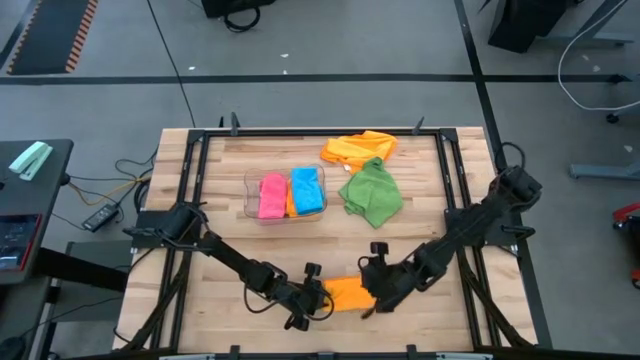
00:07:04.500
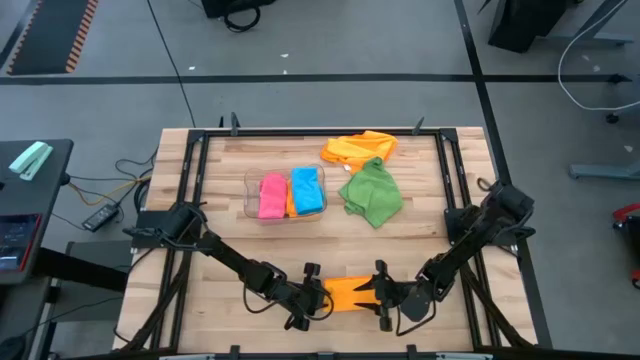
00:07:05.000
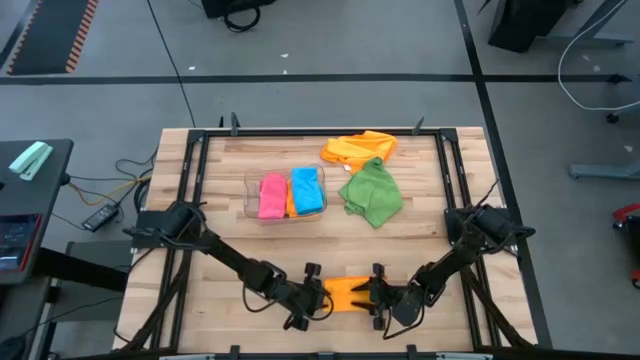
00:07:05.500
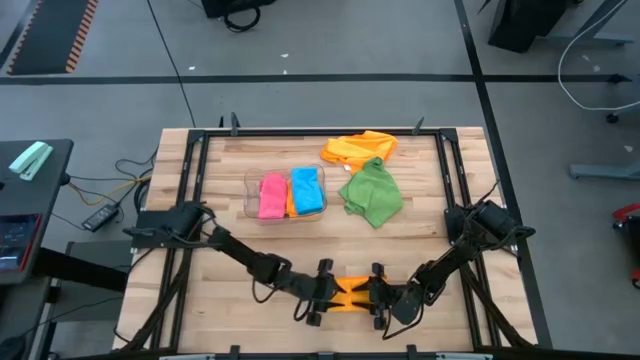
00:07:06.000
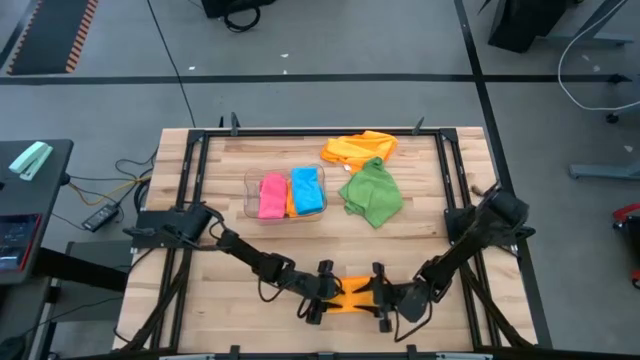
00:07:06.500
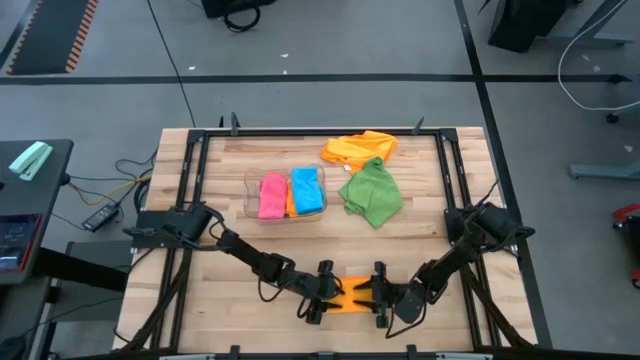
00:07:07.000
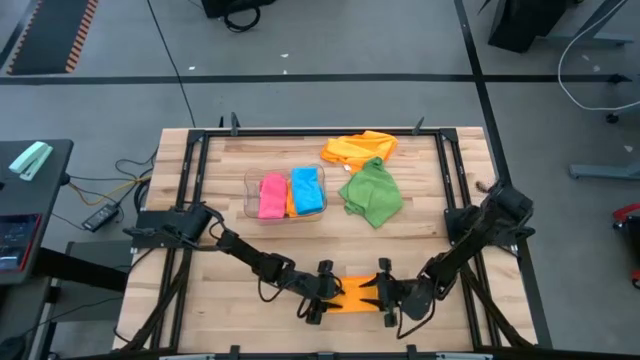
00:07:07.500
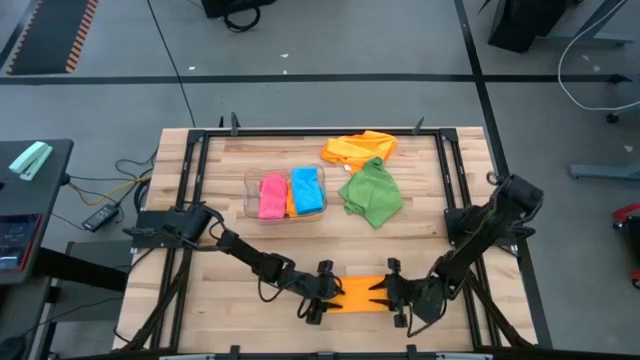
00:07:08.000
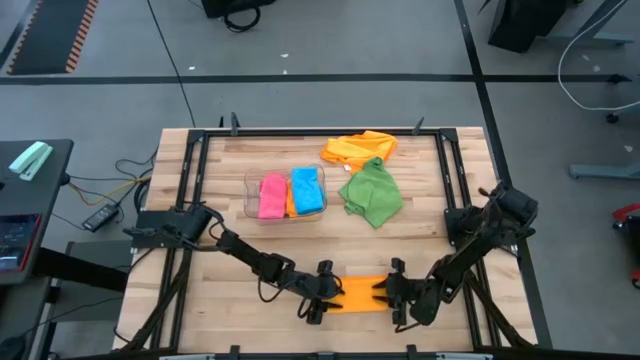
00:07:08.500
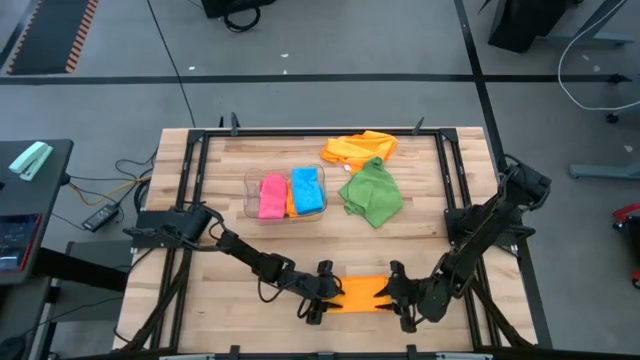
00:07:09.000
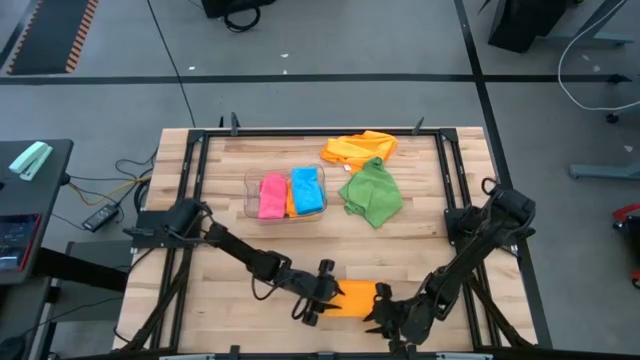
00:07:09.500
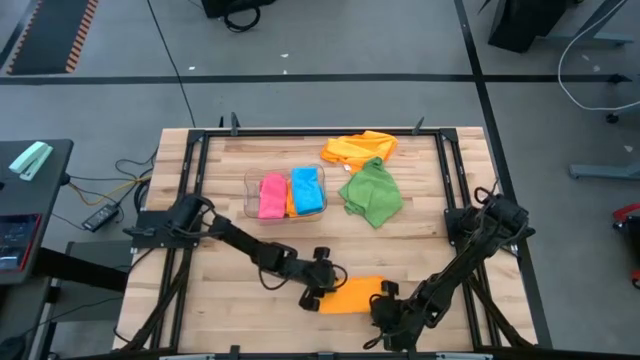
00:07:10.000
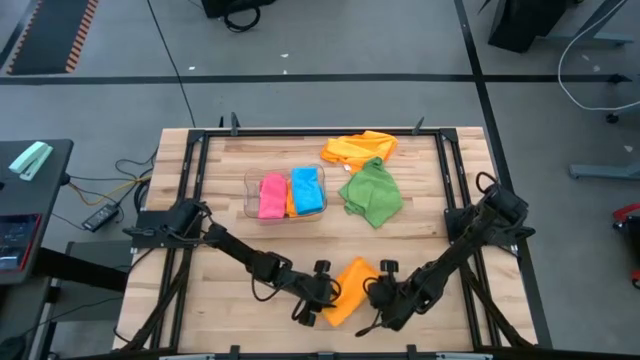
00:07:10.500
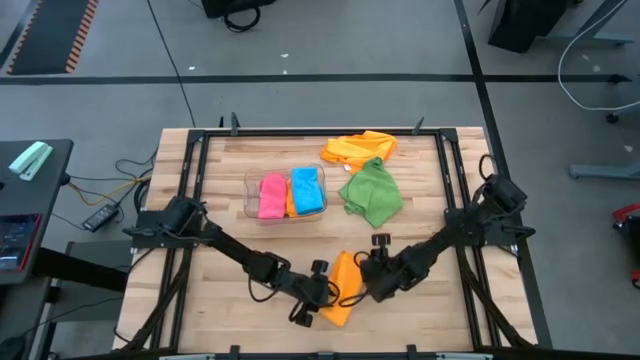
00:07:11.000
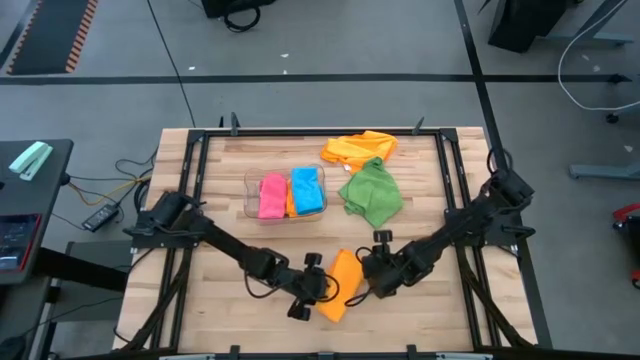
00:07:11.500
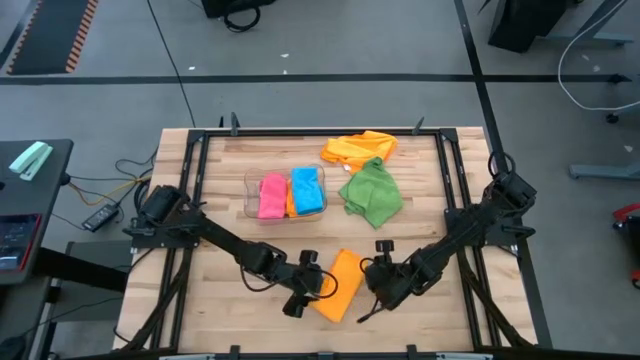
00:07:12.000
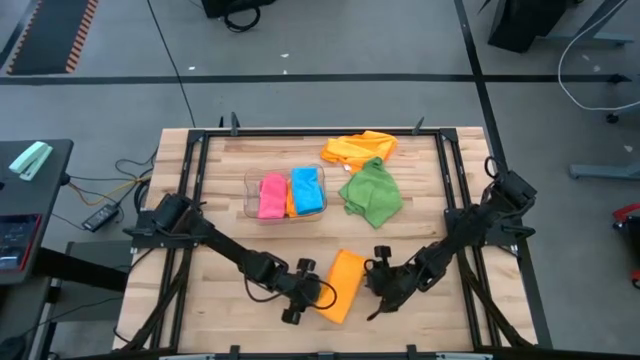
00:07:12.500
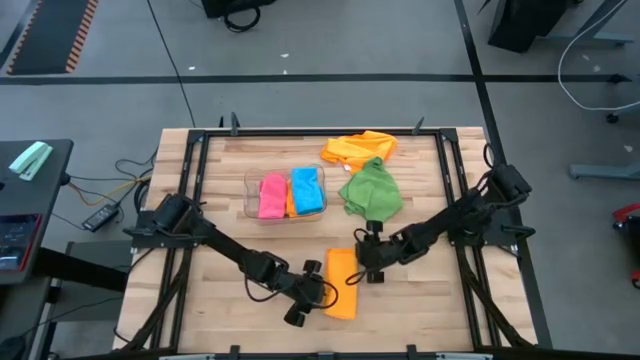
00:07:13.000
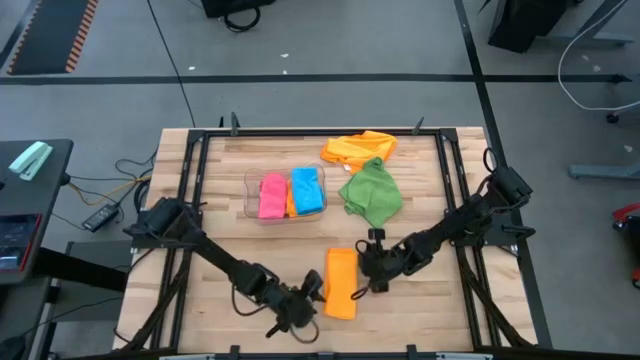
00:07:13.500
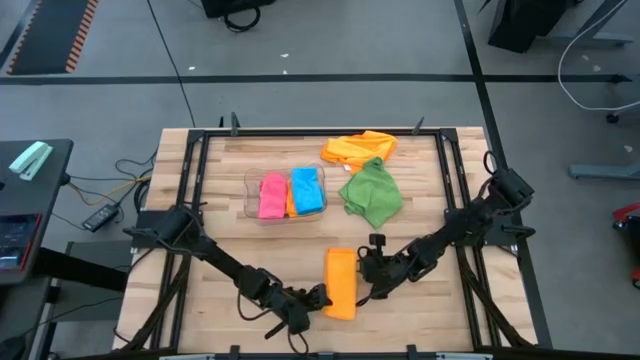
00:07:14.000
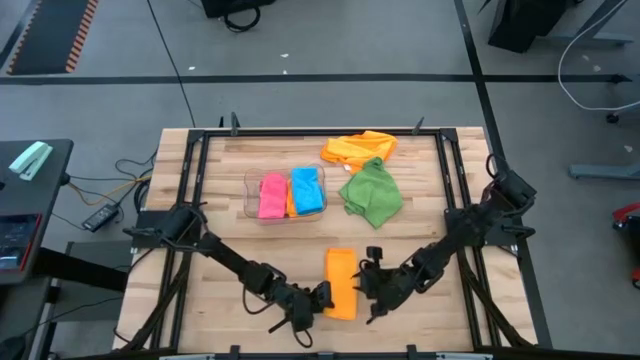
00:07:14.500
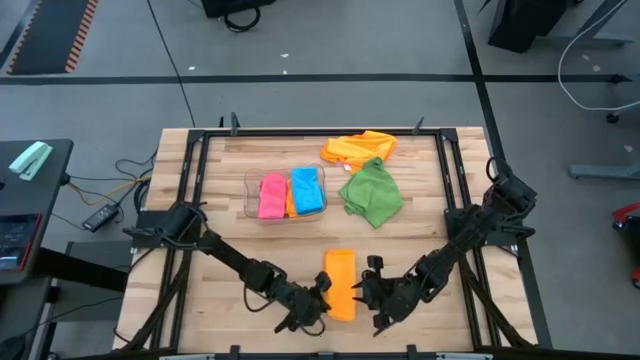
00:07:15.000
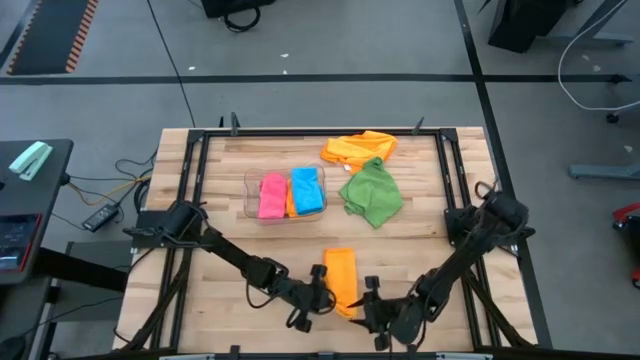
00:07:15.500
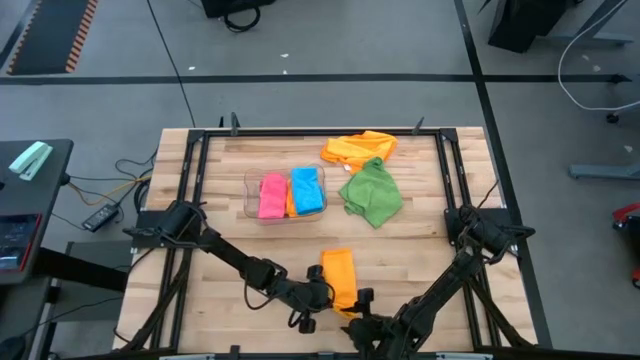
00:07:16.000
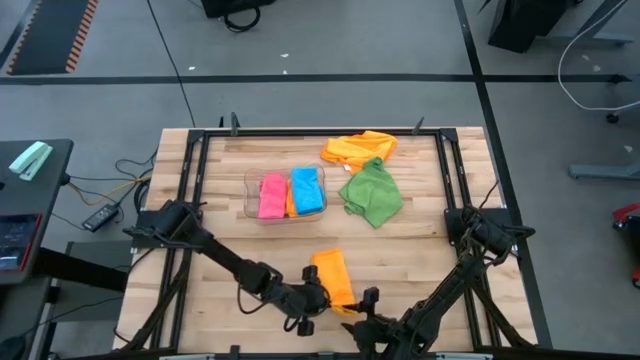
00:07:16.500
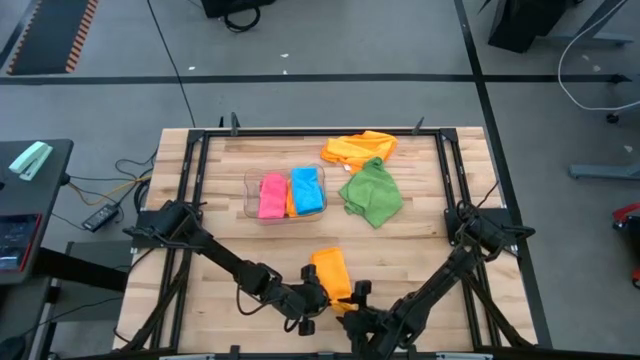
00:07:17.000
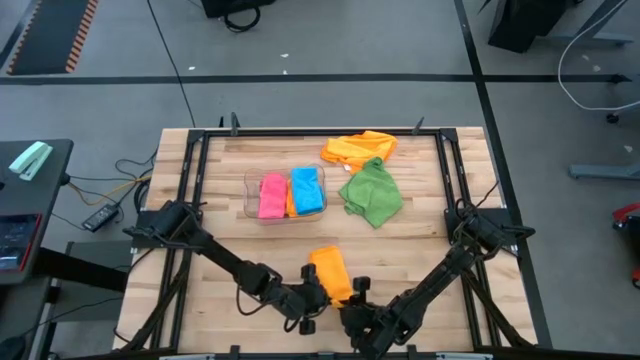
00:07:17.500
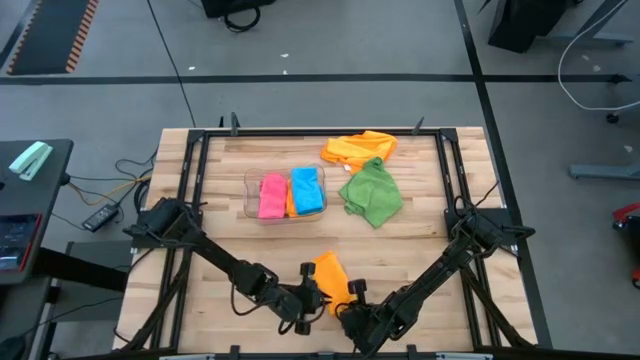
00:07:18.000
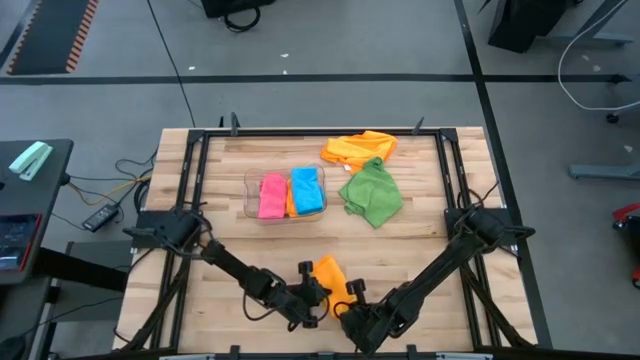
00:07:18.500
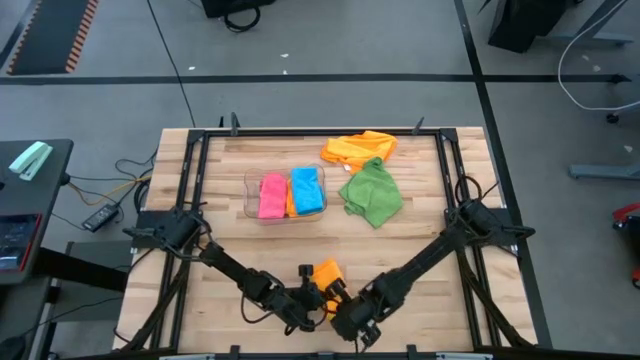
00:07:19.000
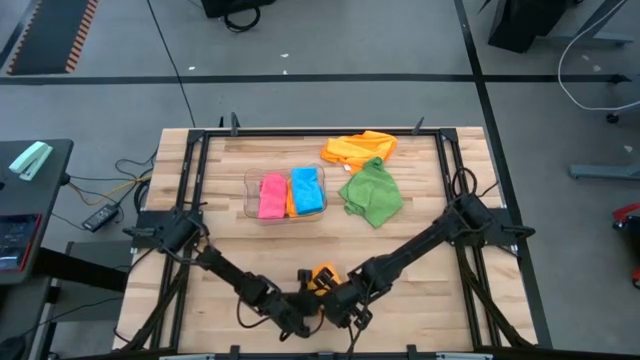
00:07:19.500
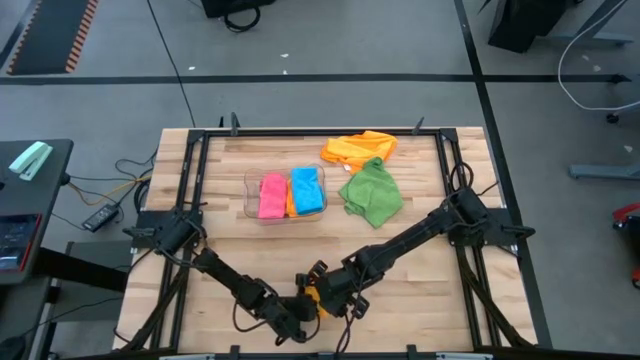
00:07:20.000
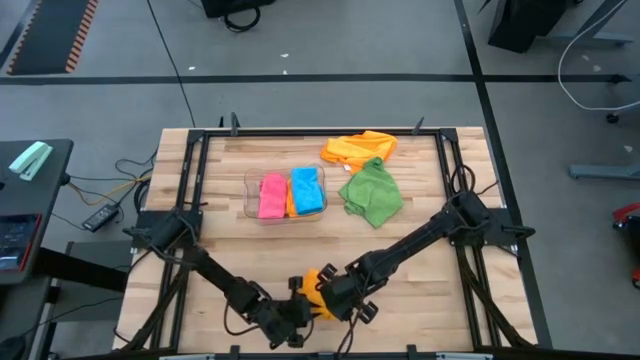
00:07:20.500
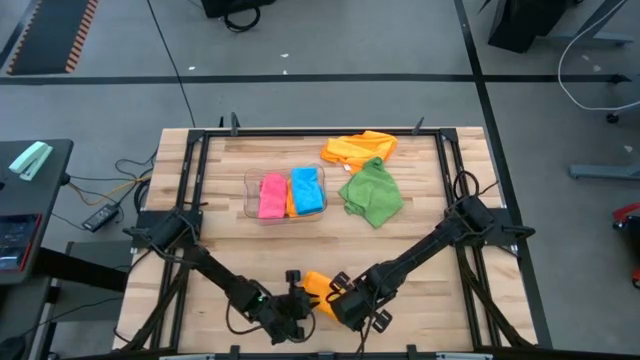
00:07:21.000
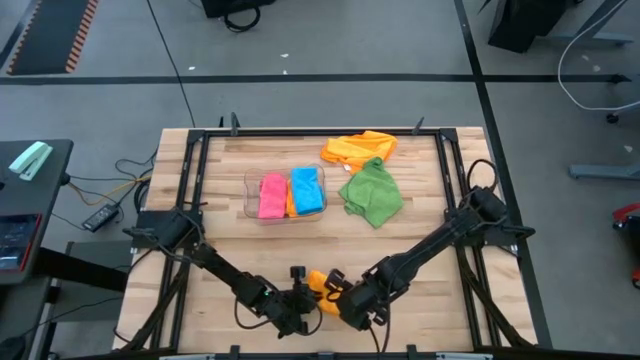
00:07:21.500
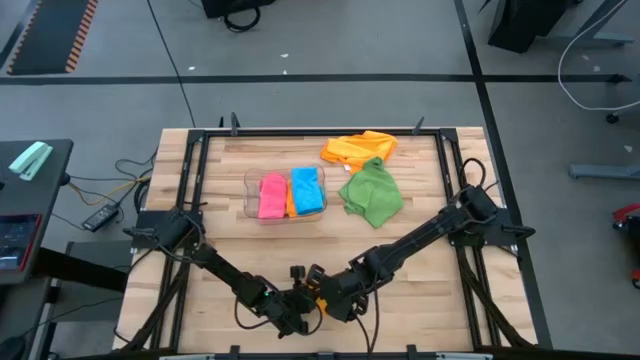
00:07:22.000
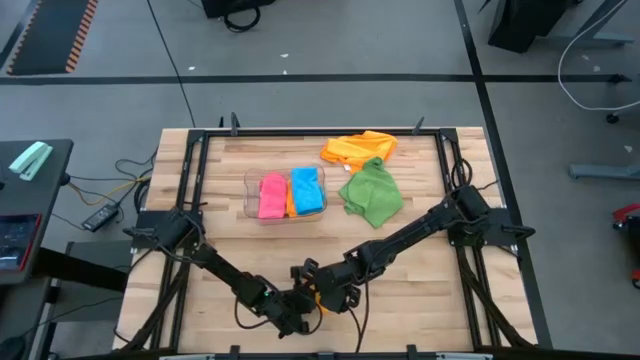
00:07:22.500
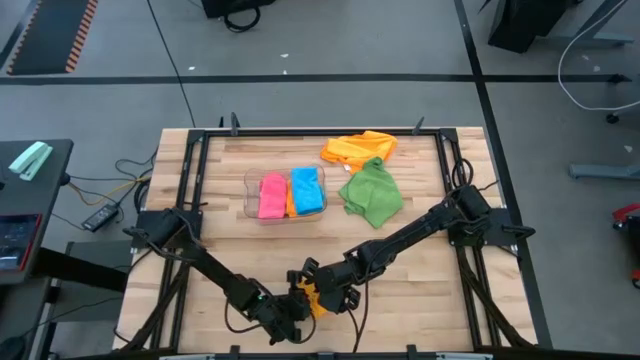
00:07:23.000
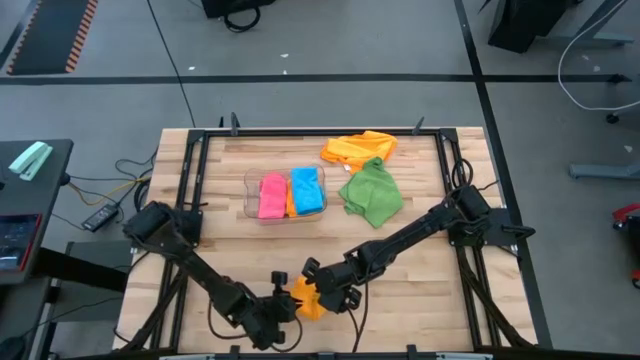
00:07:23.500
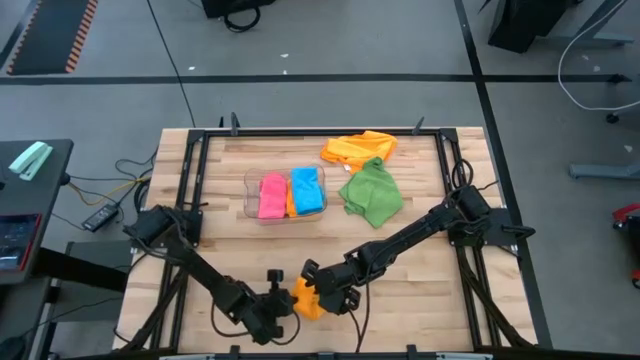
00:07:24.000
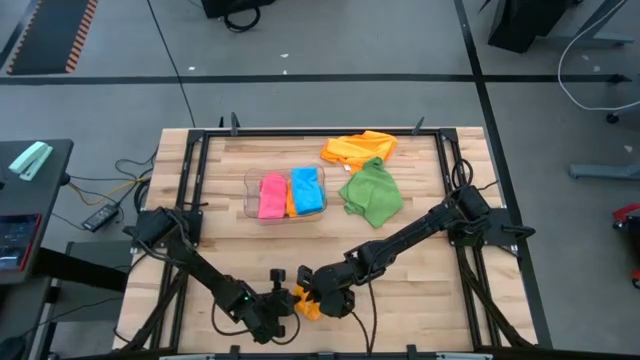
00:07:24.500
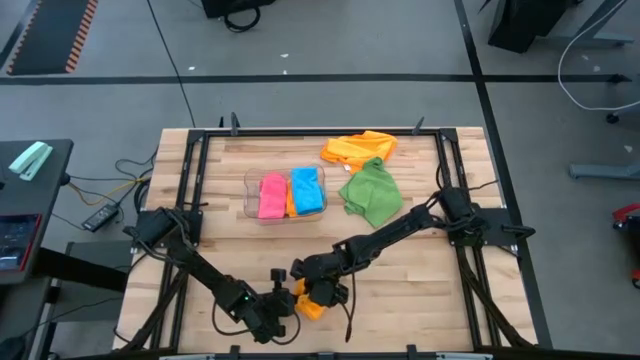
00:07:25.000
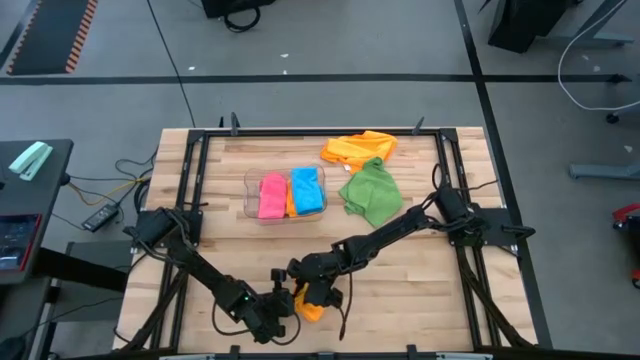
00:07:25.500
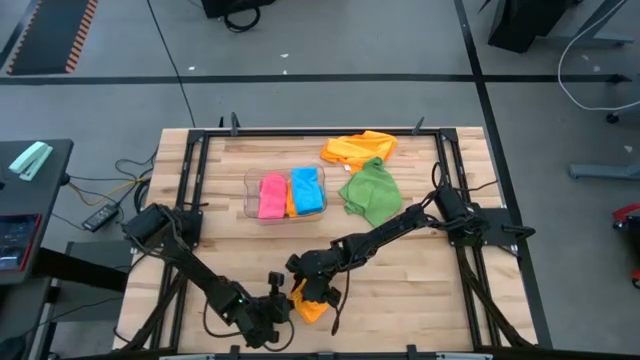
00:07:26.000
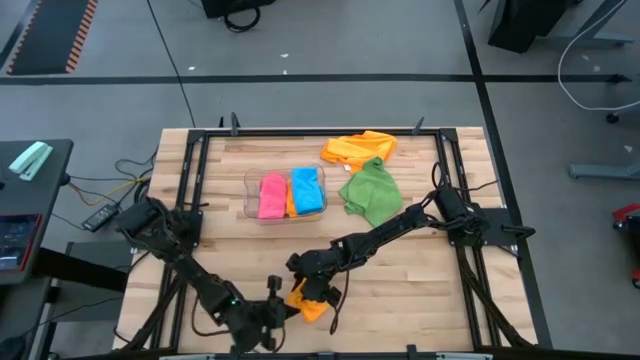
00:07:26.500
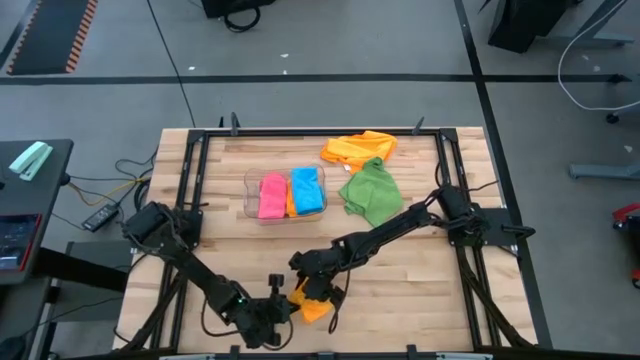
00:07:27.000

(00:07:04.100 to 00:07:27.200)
Task: Fold microfiber towels
Fold the bottom orange microfiber cloth
